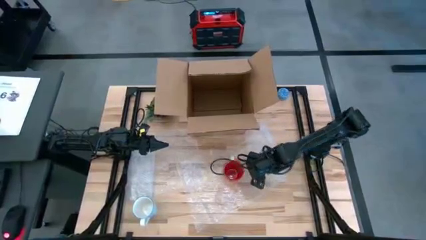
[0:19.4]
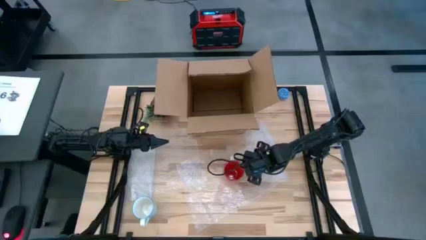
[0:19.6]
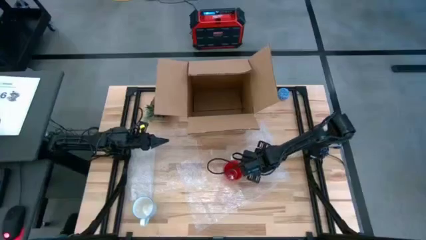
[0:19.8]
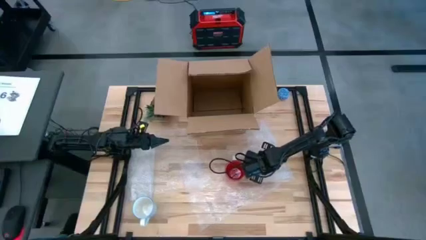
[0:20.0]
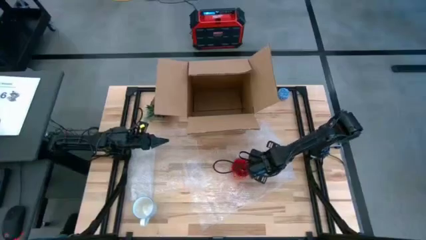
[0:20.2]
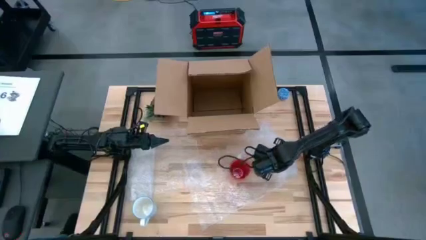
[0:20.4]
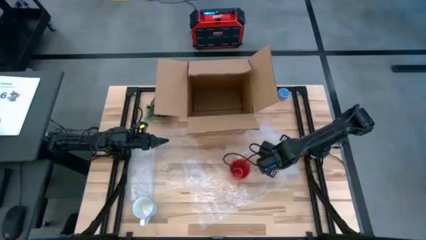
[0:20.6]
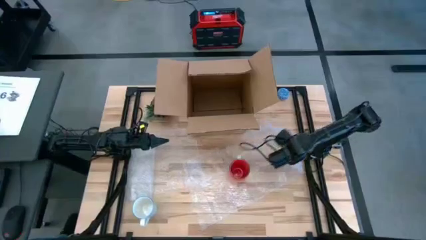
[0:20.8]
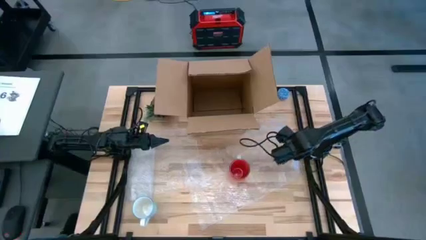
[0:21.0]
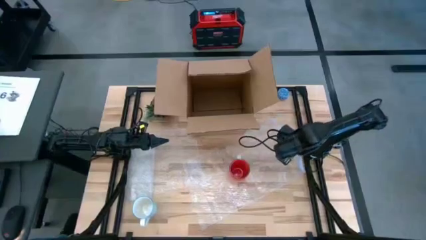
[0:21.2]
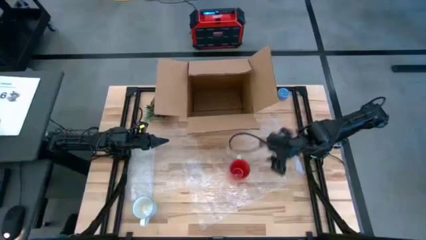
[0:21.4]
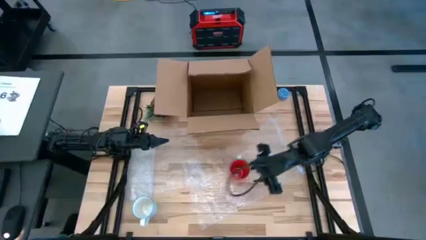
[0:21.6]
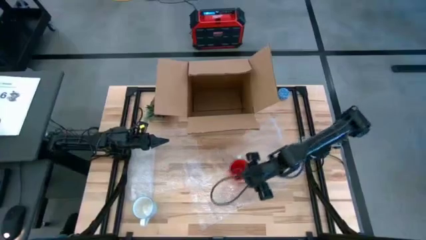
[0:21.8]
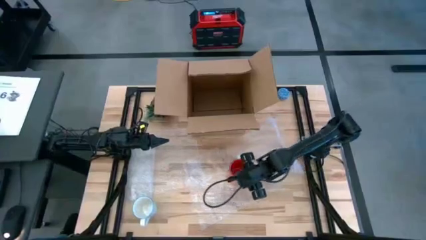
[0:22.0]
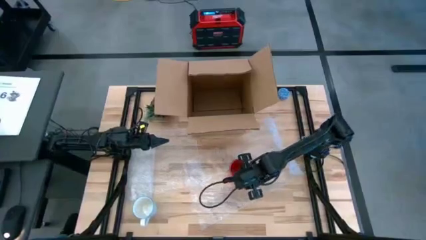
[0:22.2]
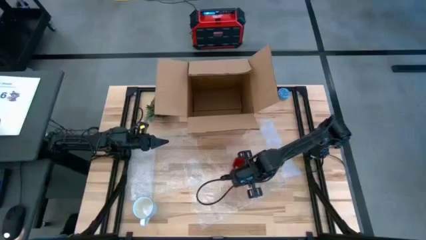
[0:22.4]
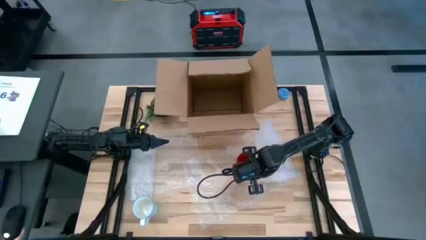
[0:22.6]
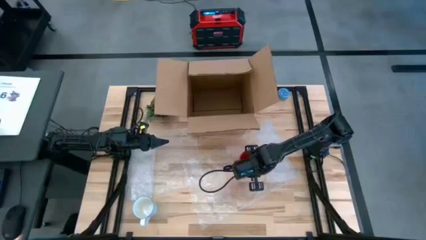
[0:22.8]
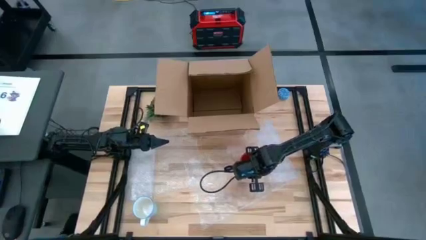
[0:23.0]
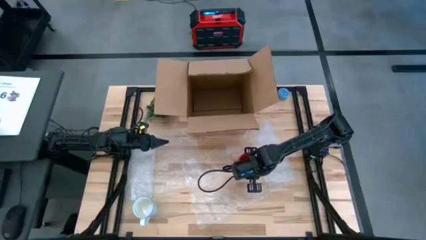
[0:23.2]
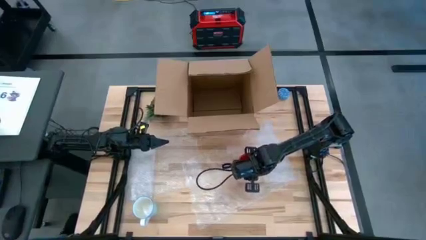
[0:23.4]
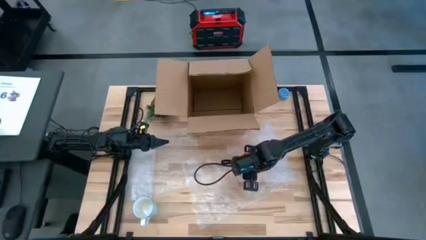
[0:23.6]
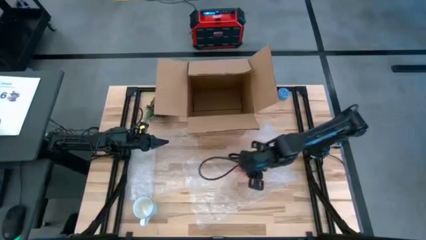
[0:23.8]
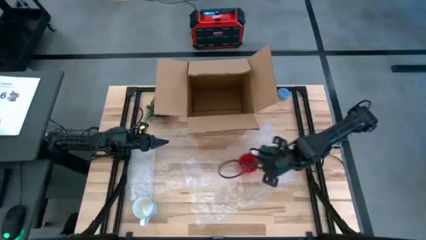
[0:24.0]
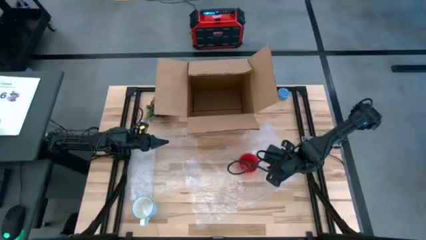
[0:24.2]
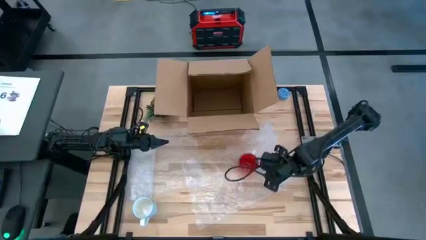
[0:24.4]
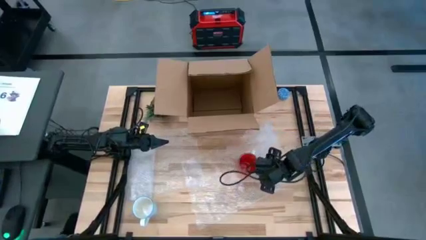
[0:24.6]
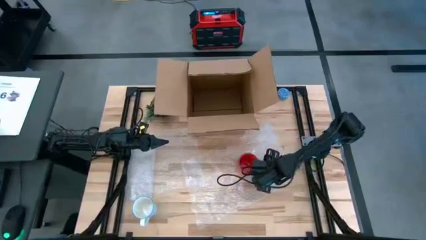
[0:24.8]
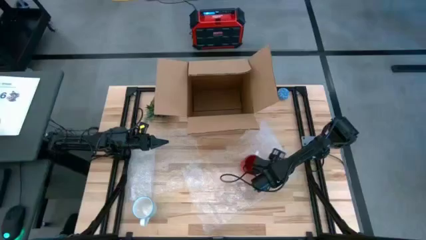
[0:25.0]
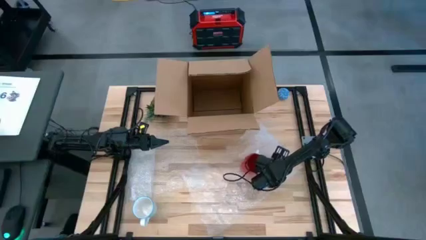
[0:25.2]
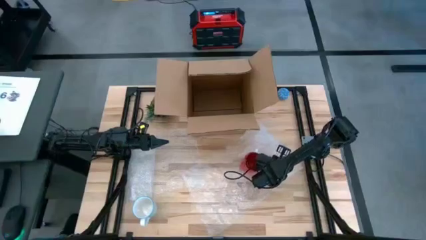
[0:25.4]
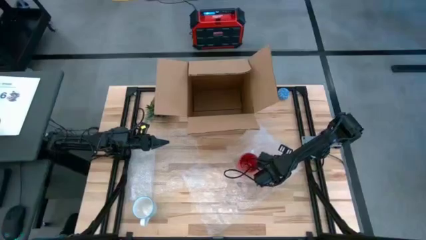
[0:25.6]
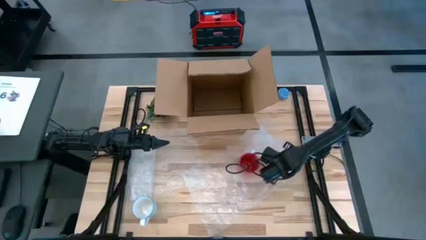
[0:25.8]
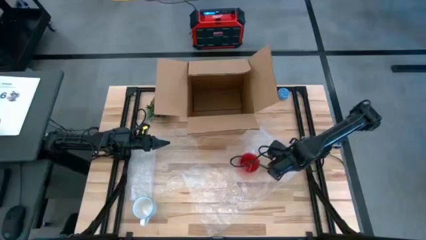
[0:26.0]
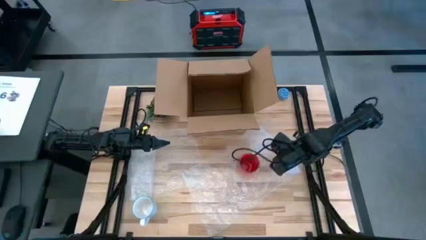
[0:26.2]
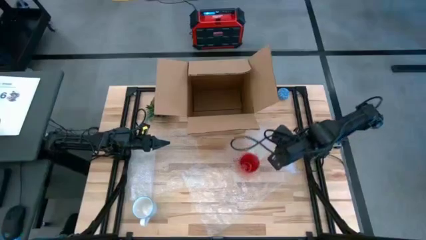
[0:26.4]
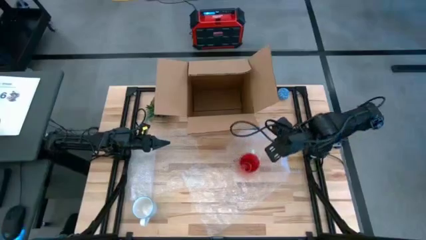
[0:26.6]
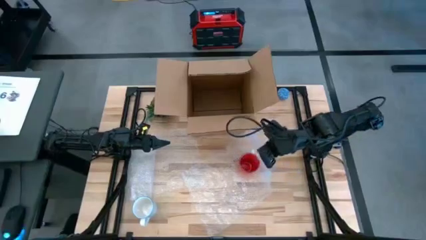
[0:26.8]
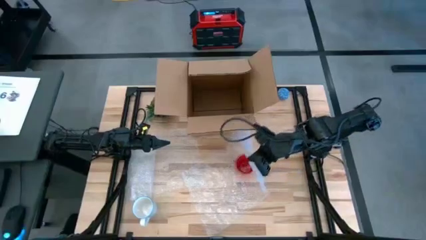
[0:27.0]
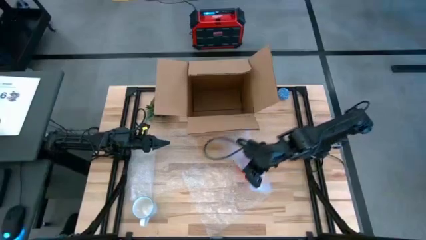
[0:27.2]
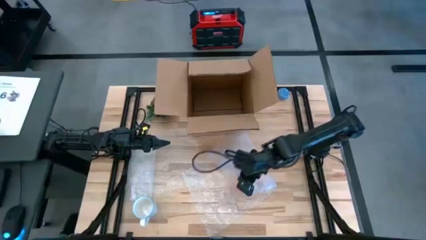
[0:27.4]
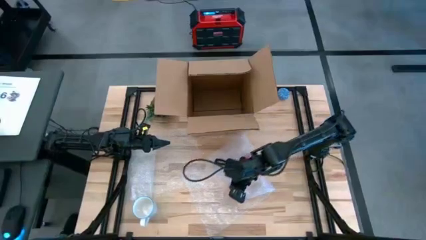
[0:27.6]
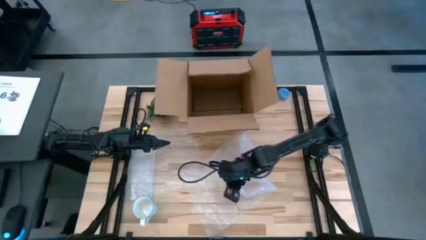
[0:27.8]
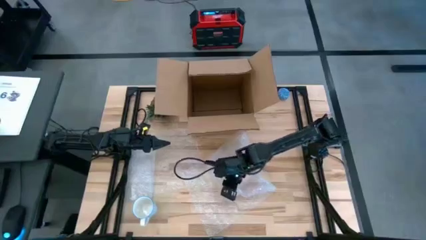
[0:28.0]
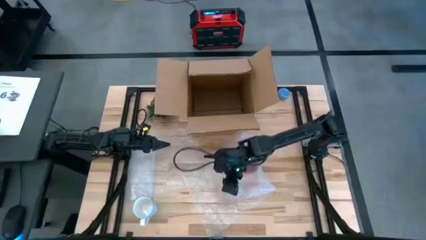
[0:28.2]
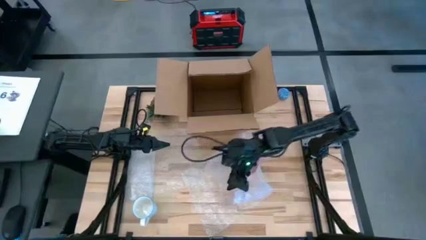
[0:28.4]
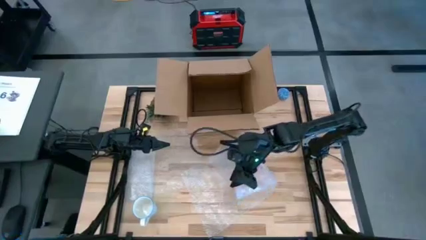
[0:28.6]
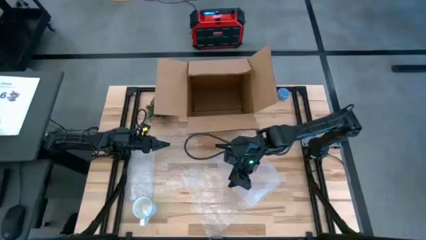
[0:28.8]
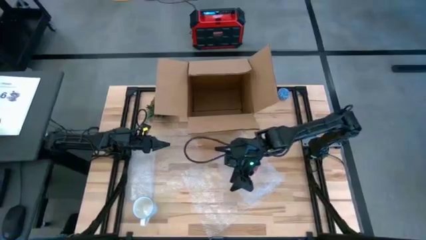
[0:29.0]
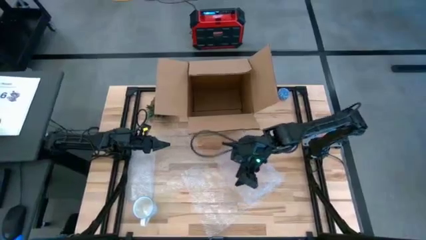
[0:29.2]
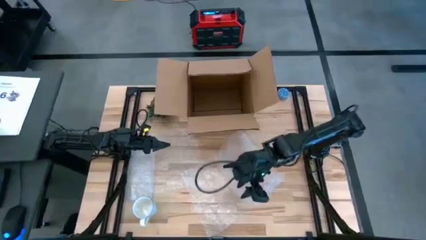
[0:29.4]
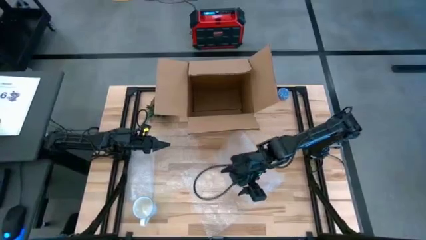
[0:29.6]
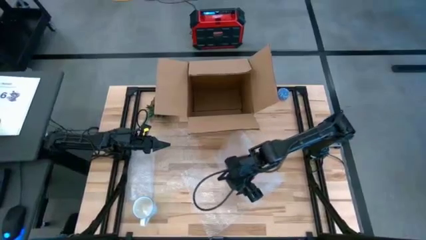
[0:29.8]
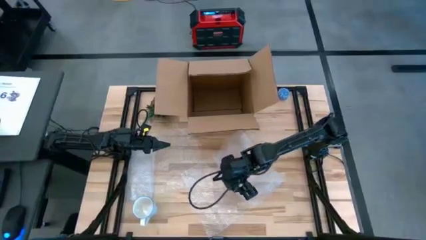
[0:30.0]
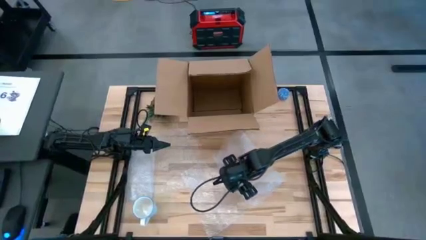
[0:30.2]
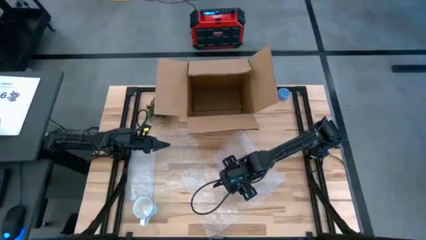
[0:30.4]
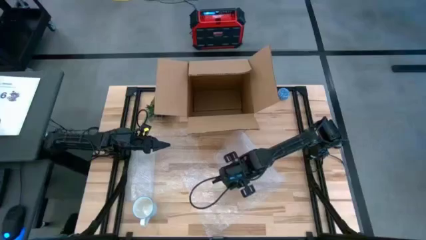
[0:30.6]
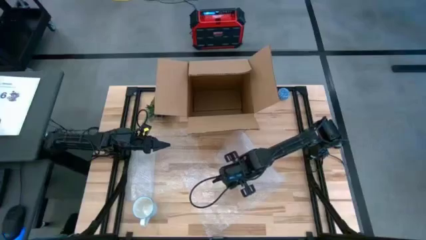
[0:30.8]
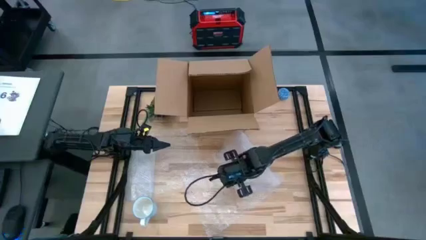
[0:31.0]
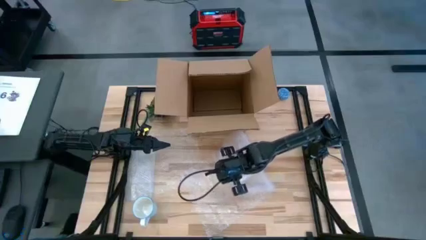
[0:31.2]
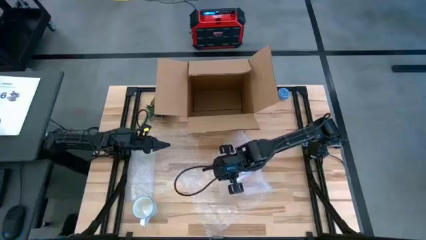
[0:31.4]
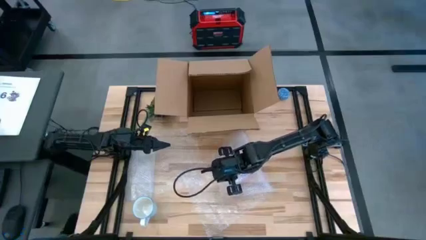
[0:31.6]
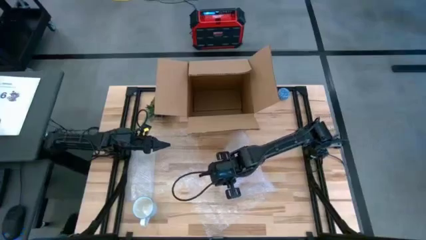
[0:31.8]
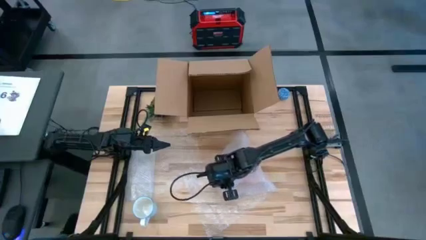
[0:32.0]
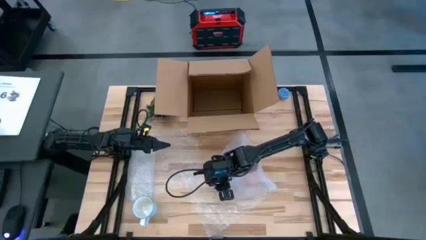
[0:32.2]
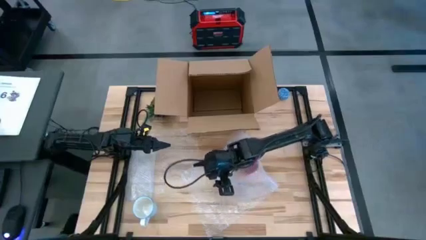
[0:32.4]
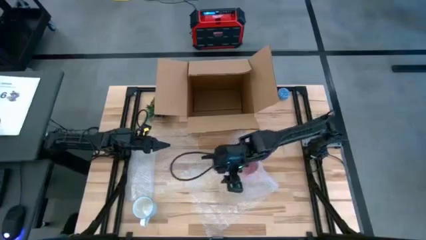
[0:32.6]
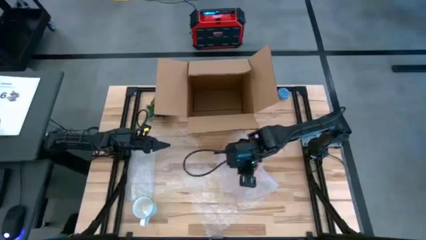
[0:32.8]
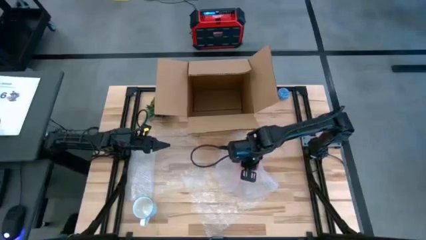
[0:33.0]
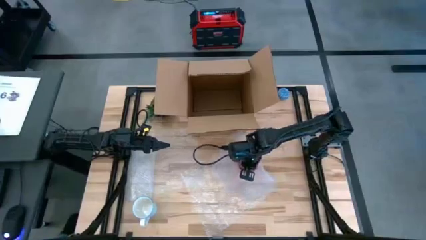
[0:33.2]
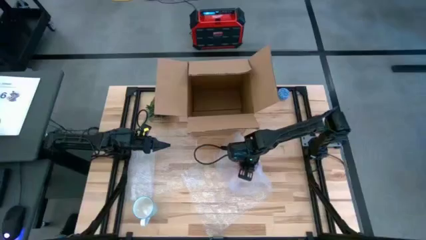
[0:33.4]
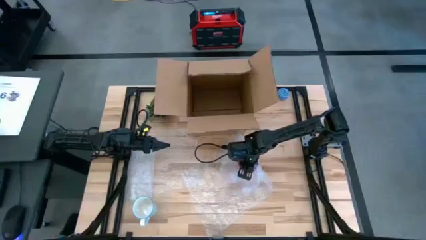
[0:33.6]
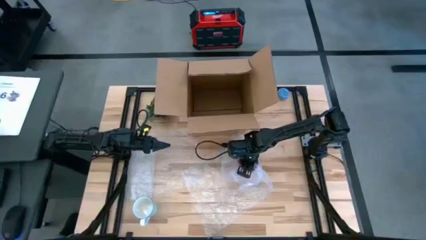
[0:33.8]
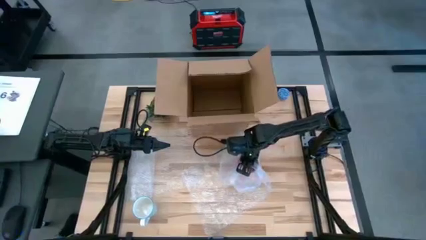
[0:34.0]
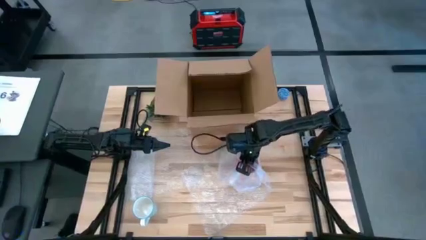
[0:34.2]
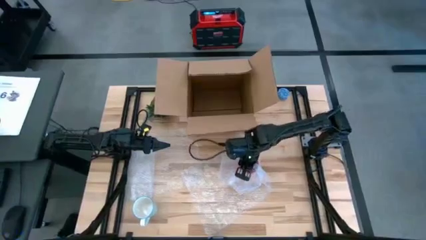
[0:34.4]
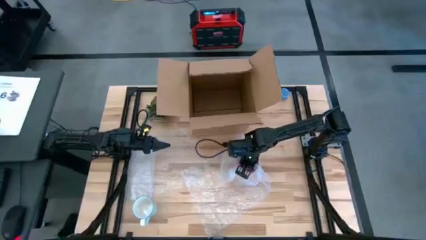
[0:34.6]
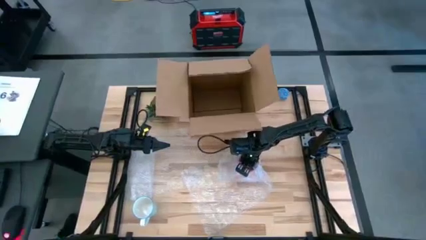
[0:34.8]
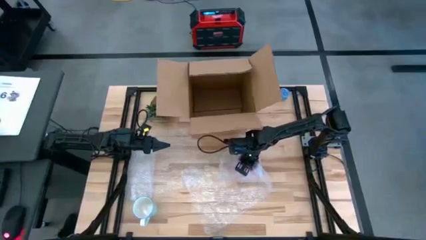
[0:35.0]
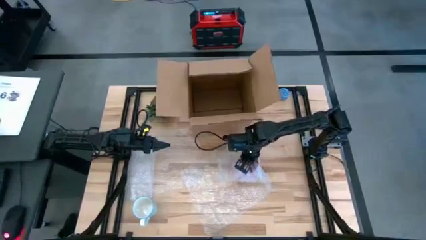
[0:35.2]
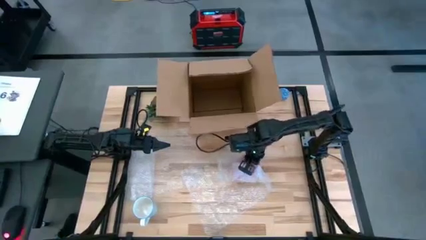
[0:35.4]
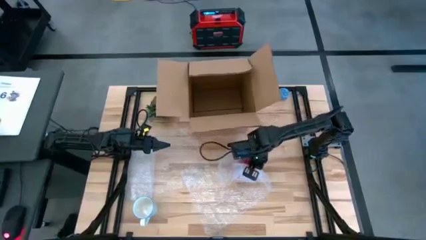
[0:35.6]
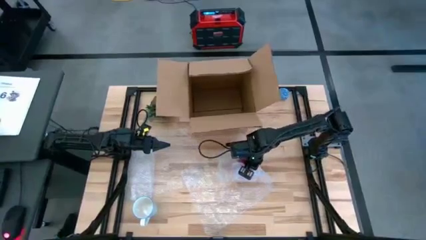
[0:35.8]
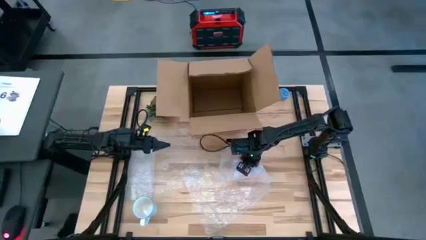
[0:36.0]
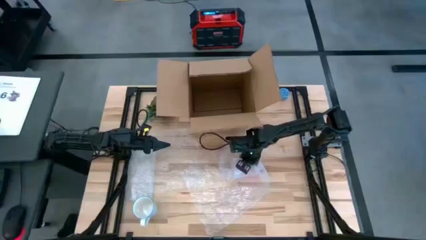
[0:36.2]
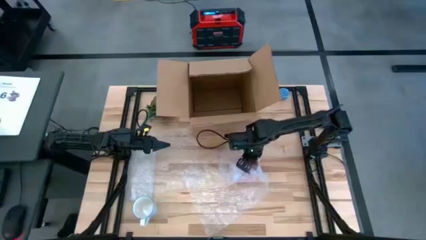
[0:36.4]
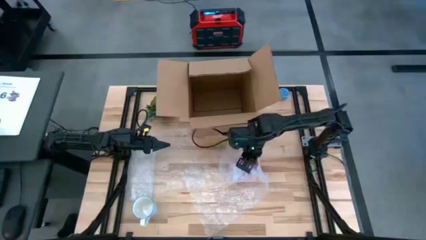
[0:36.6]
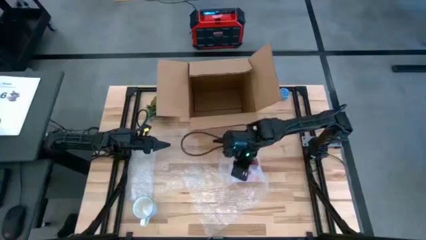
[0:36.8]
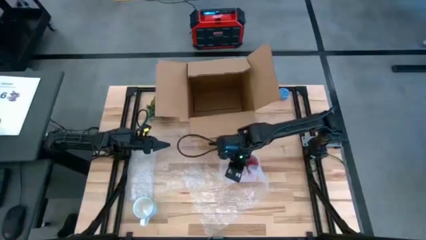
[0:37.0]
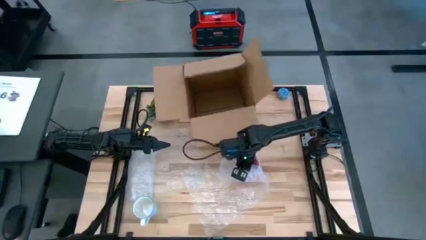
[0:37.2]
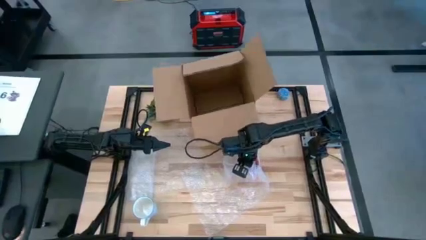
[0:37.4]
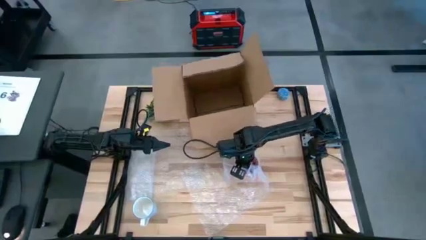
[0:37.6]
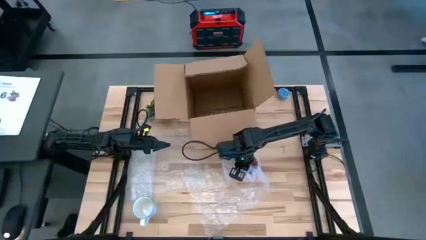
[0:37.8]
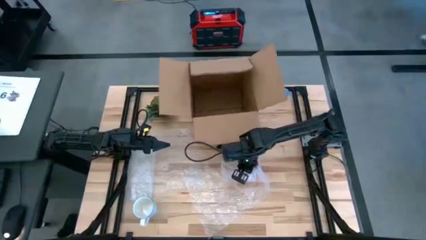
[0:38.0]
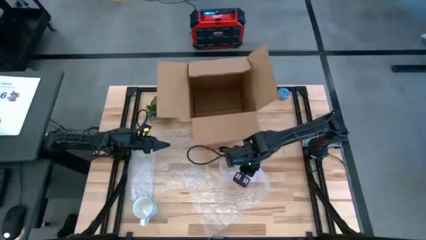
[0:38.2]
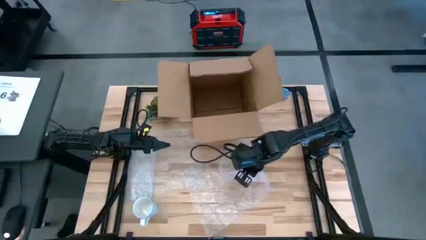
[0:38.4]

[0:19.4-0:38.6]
Task: wrap mug
Wrap the red mug with bubble wrap
